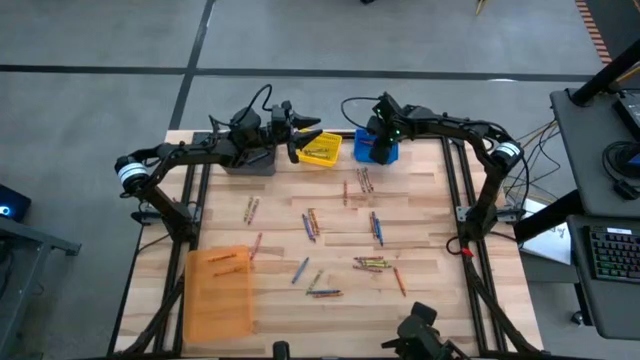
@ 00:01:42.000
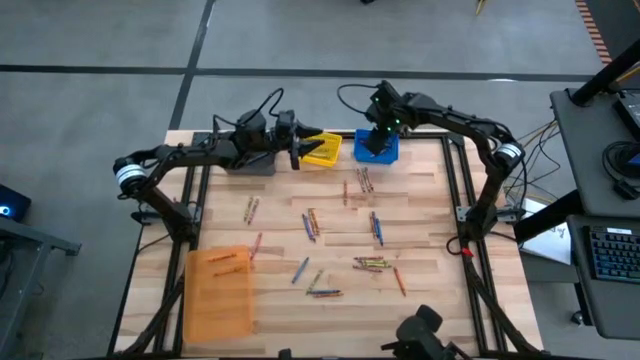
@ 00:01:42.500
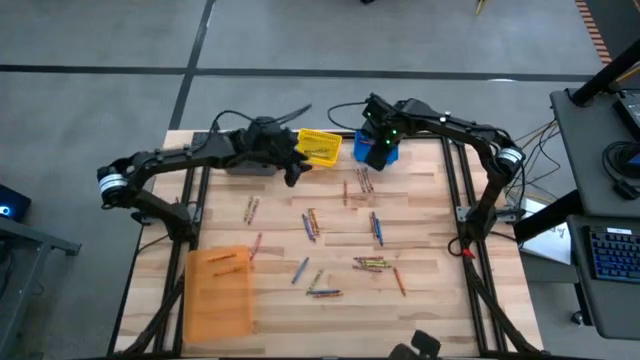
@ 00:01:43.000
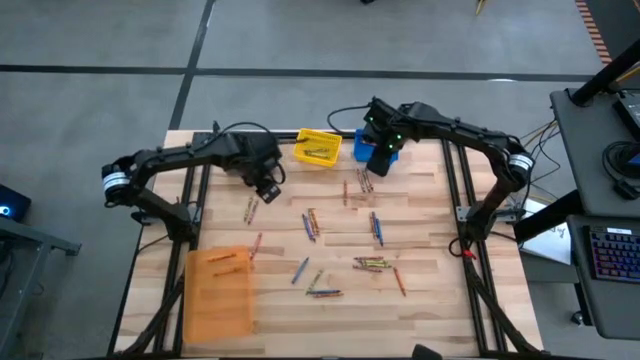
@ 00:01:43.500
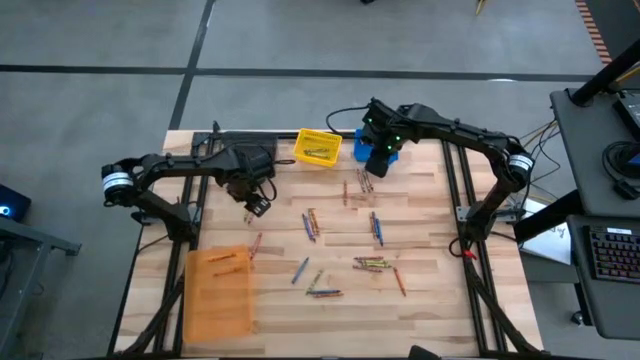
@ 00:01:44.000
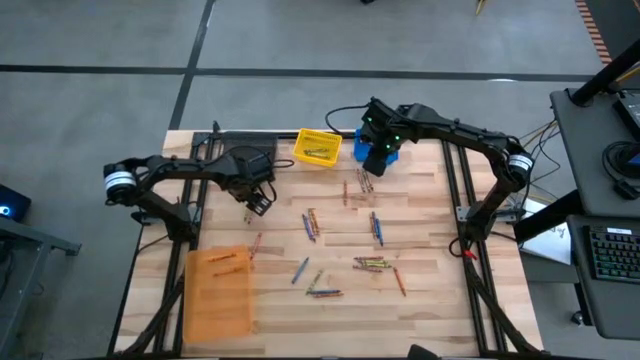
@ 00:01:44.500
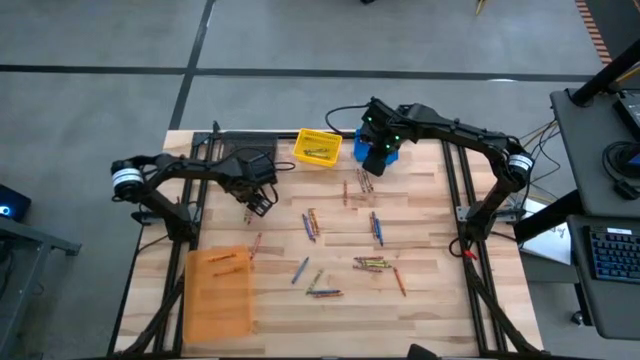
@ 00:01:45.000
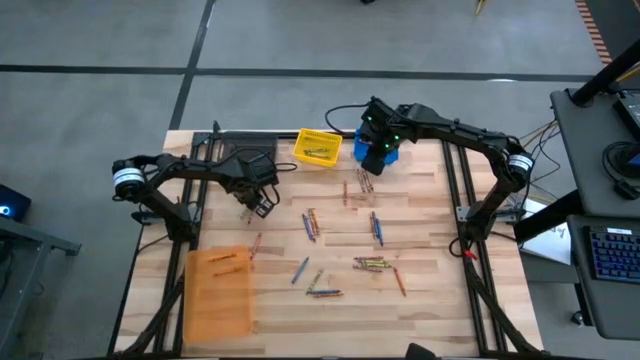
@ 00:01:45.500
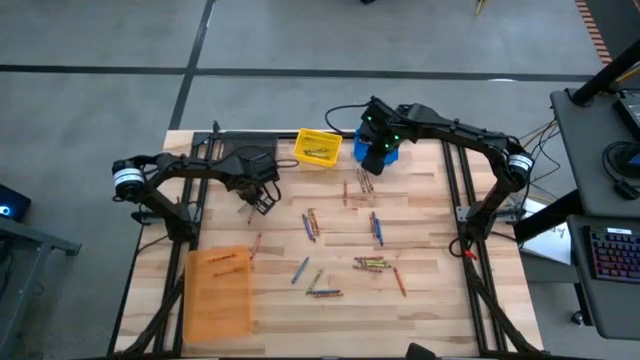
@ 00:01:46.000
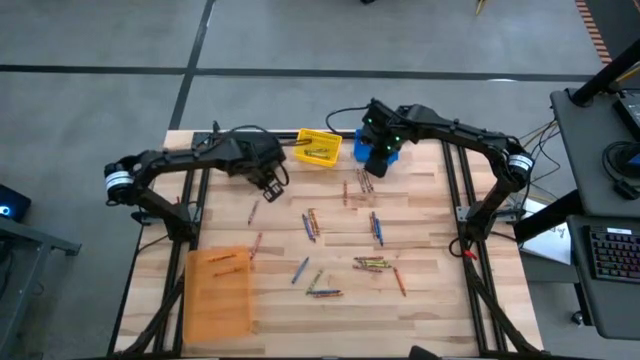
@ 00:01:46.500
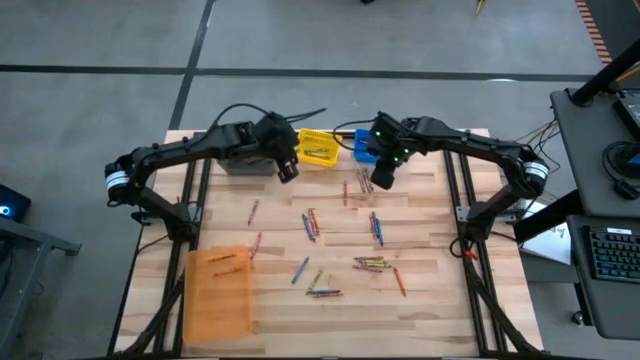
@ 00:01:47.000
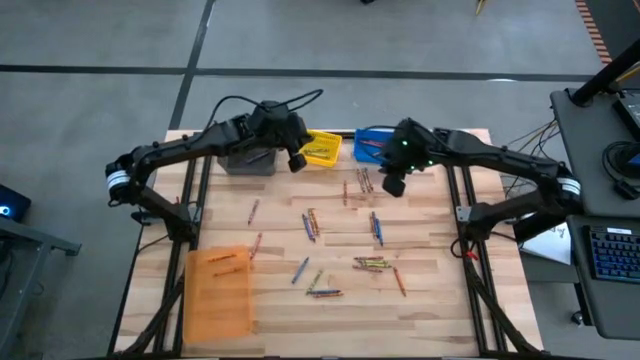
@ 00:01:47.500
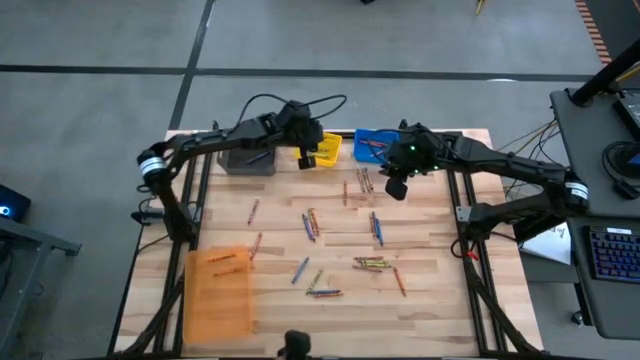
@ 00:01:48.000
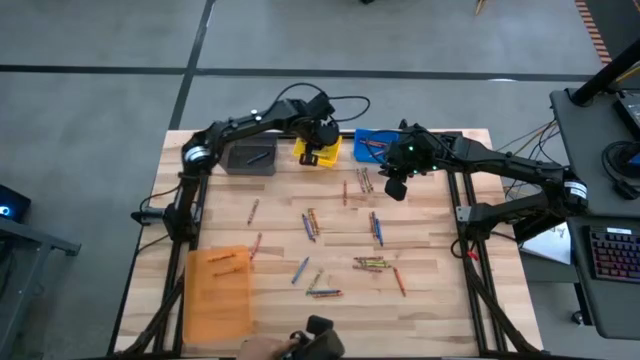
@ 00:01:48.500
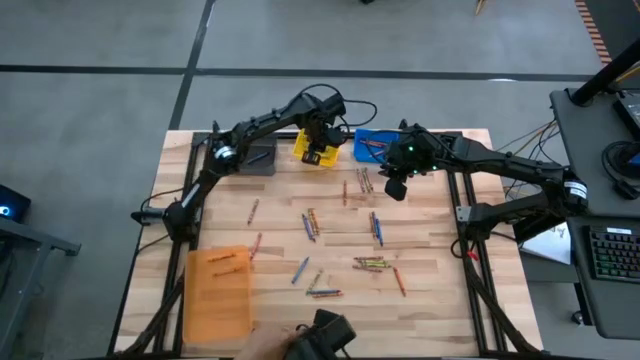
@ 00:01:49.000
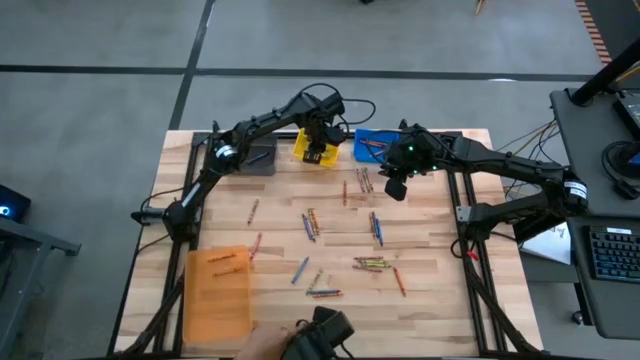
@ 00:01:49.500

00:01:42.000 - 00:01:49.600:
Task: Sort crayons
Put the green crayon into the yellow bin

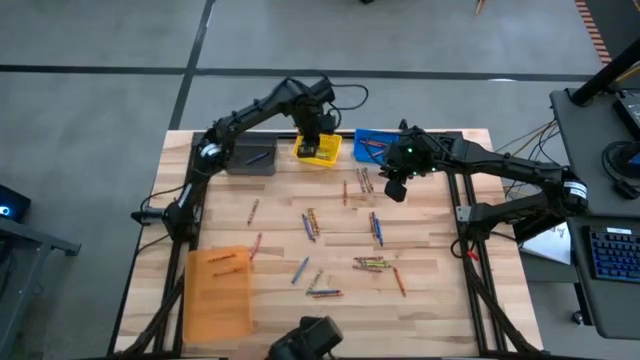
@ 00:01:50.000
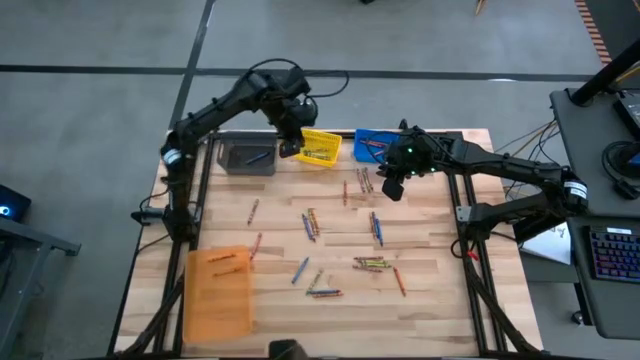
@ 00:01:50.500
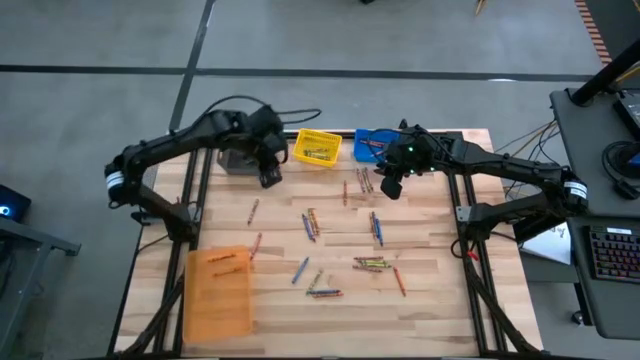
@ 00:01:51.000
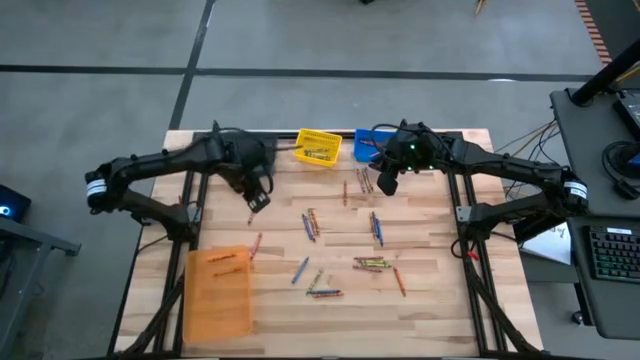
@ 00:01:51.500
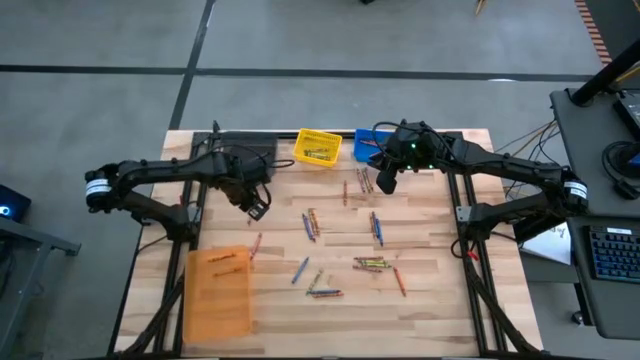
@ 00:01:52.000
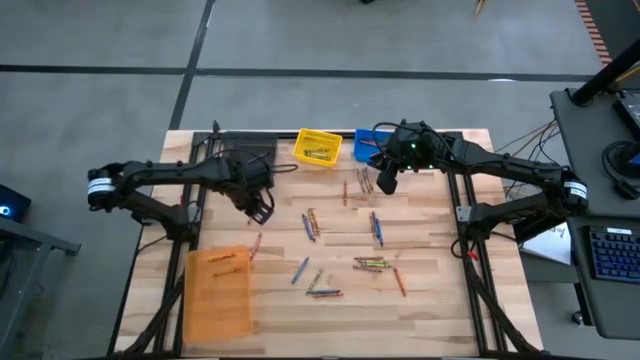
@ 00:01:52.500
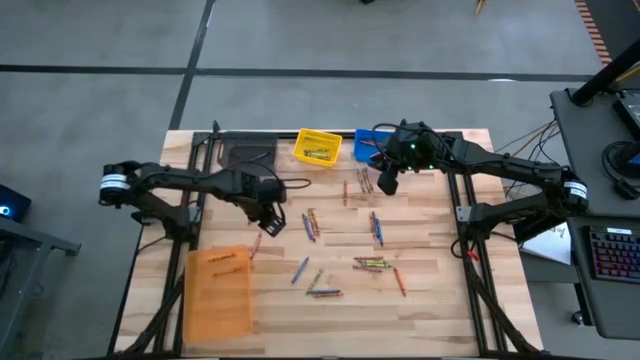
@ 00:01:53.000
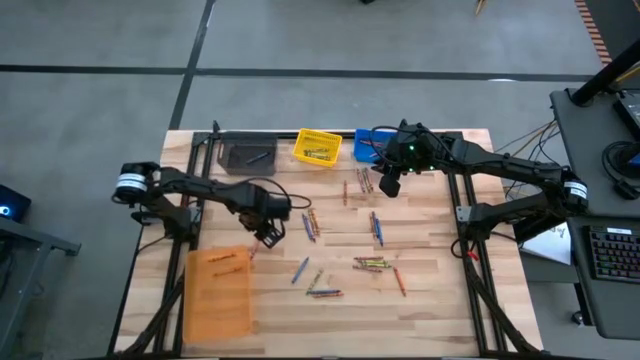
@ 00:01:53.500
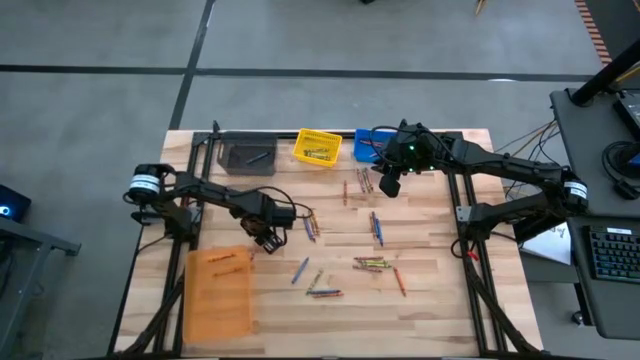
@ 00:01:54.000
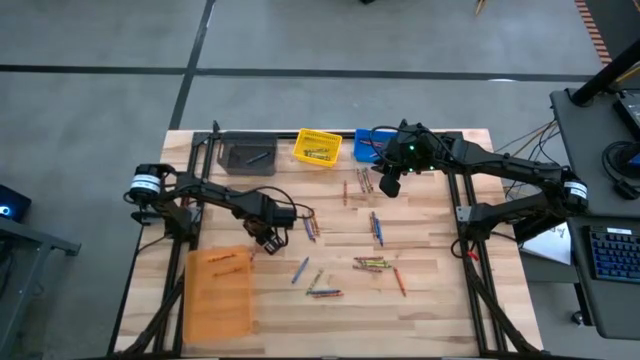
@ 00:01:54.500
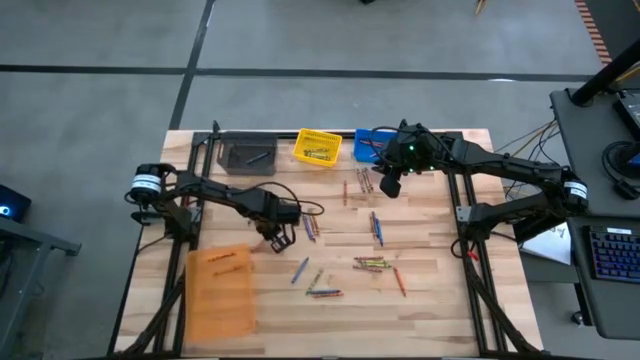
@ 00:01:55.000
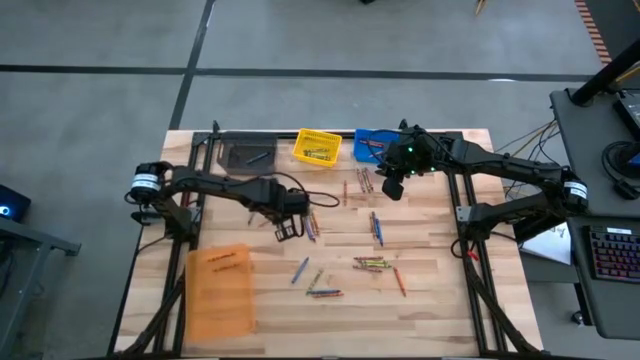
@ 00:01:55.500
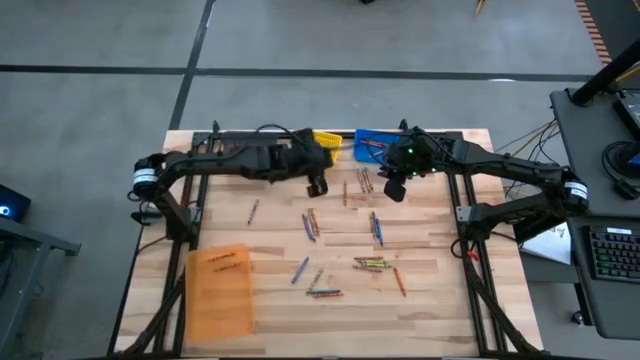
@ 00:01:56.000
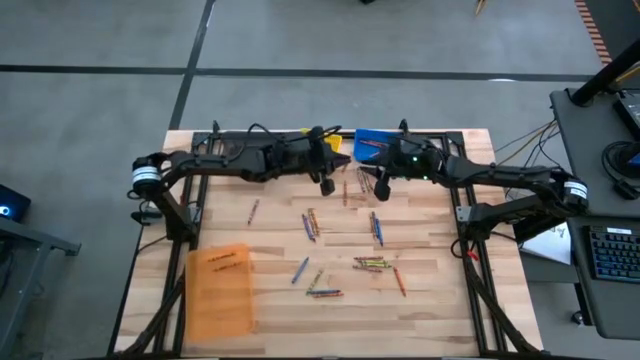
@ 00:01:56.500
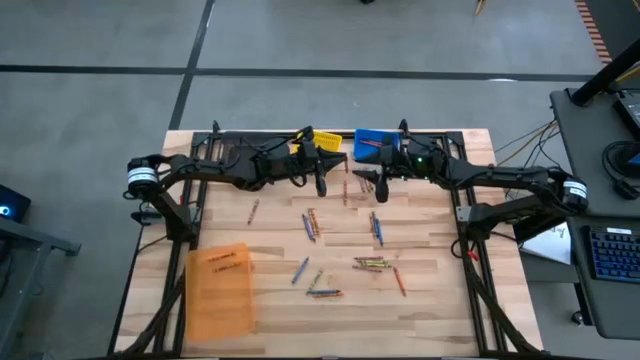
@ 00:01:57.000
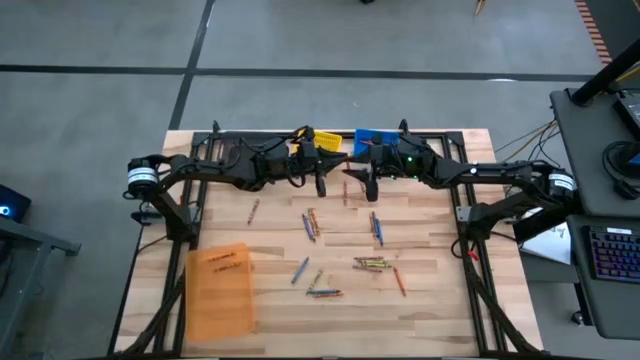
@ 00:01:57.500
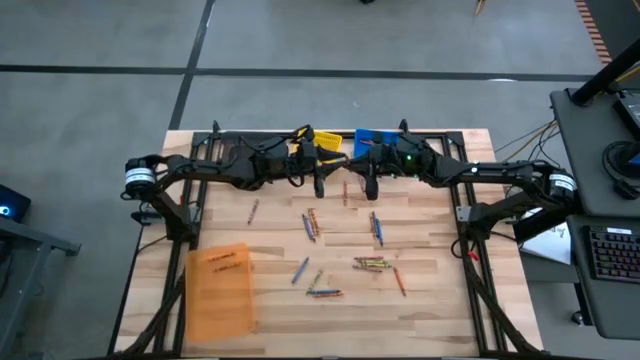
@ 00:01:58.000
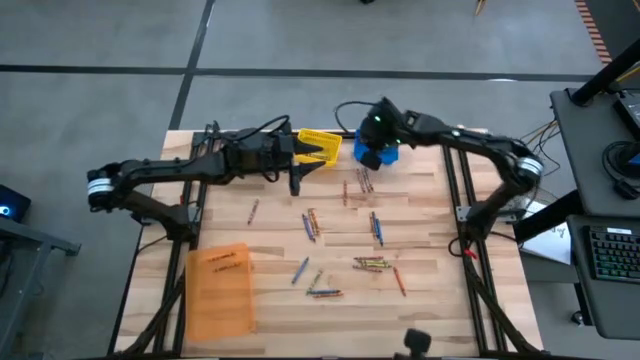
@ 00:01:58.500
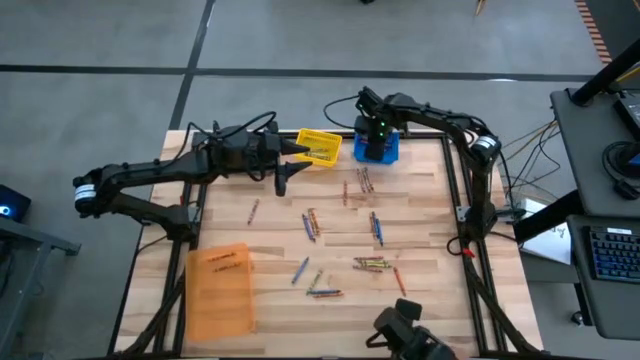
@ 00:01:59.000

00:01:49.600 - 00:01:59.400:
Put the red crayon into the blue bin

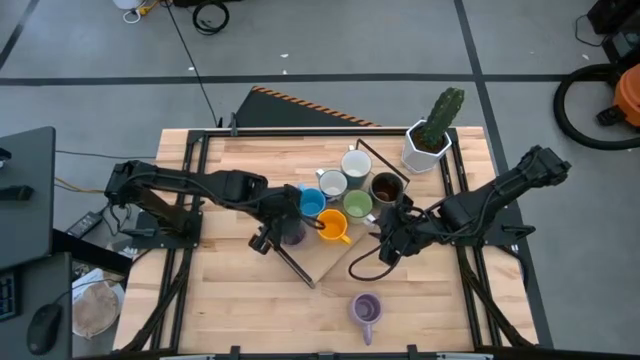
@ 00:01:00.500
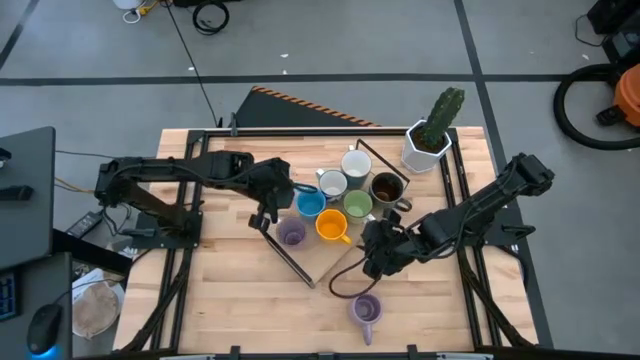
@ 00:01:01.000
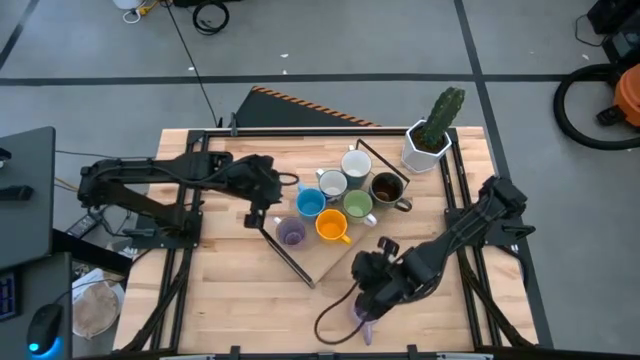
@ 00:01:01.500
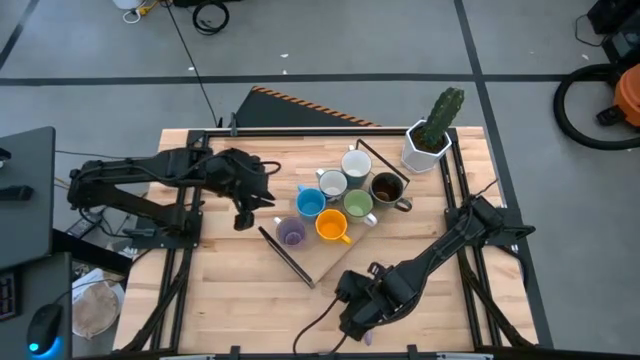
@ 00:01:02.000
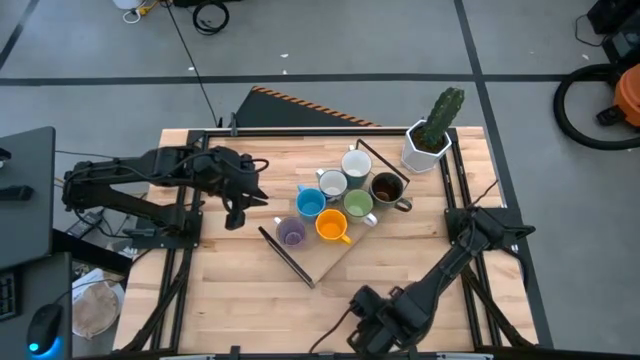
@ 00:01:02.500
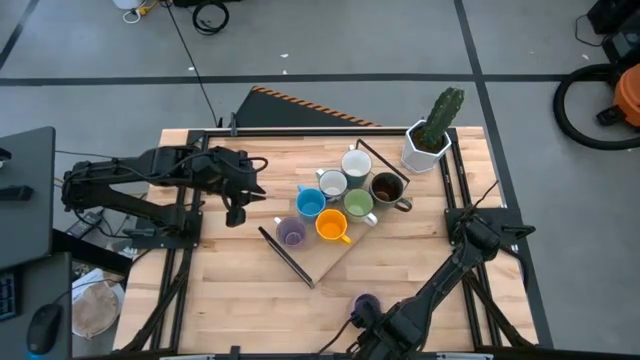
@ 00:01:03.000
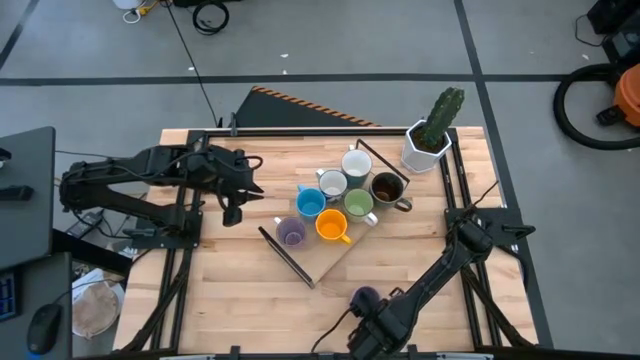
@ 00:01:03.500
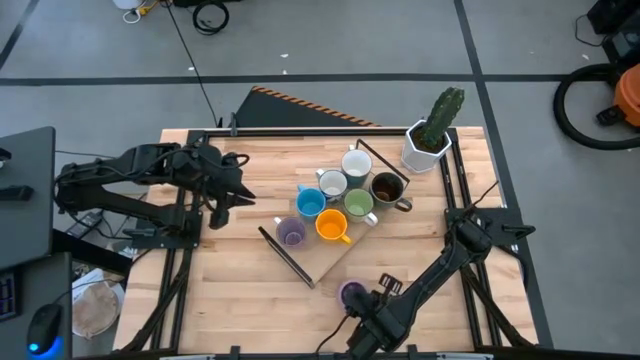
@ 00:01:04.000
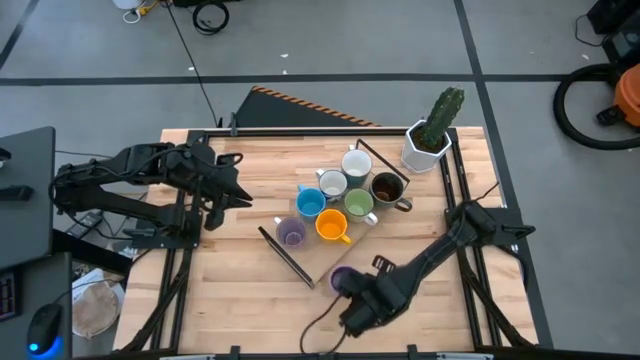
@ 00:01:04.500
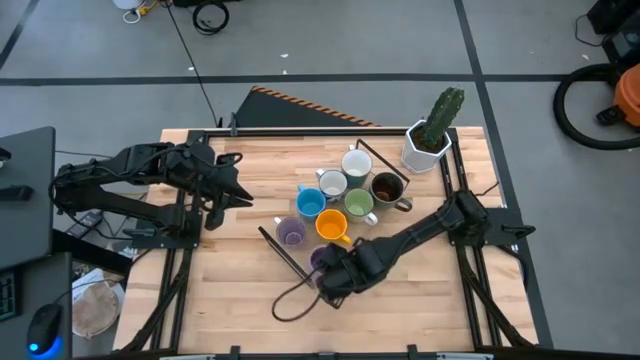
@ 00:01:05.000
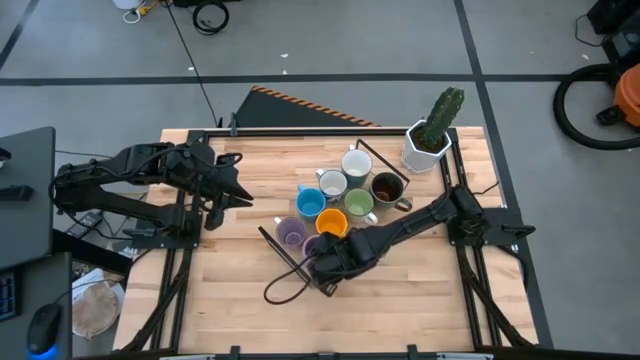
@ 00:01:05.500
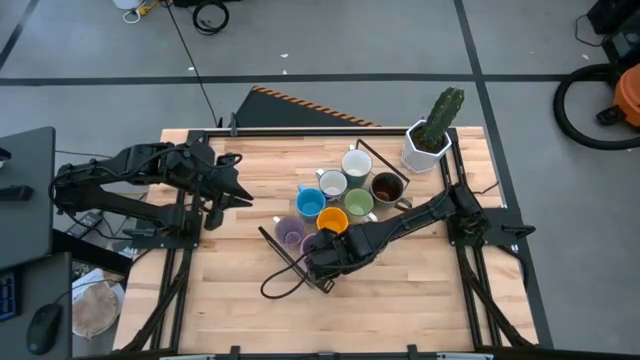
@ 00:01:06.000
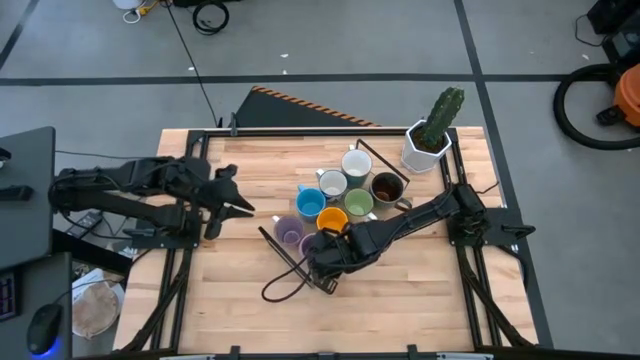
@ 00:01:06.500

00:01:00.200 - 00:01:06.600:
Task: Place coffee mugs
Put the violet mug on the shelf
